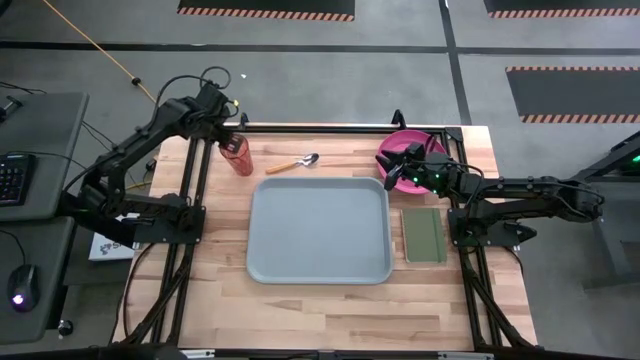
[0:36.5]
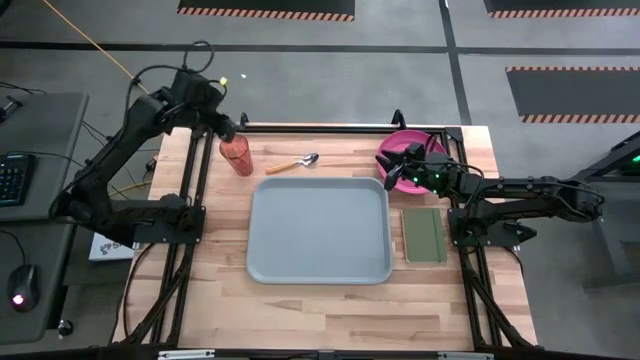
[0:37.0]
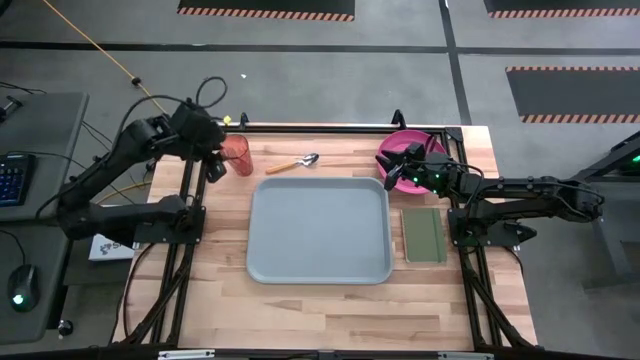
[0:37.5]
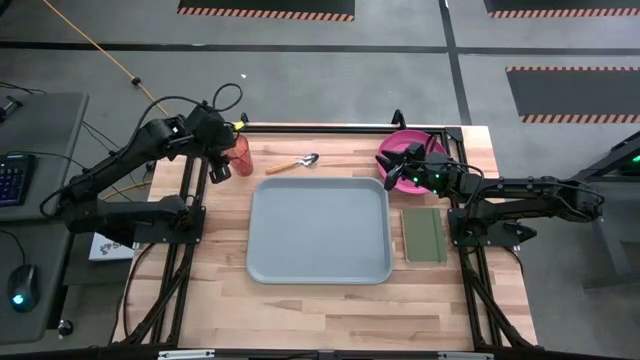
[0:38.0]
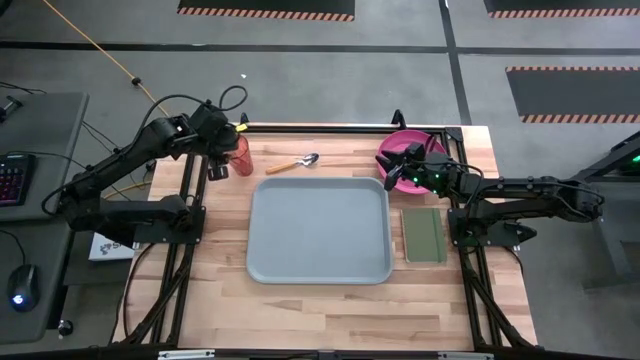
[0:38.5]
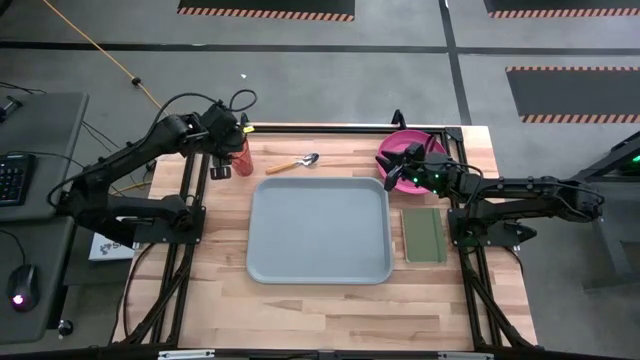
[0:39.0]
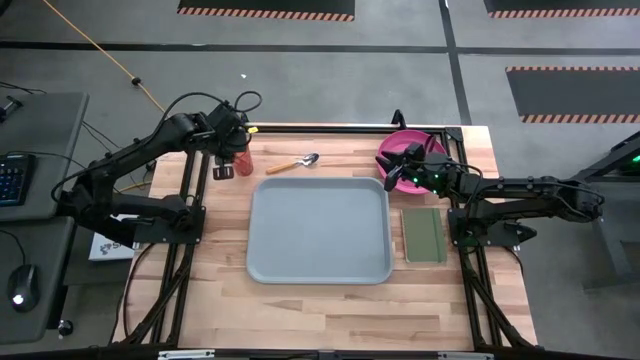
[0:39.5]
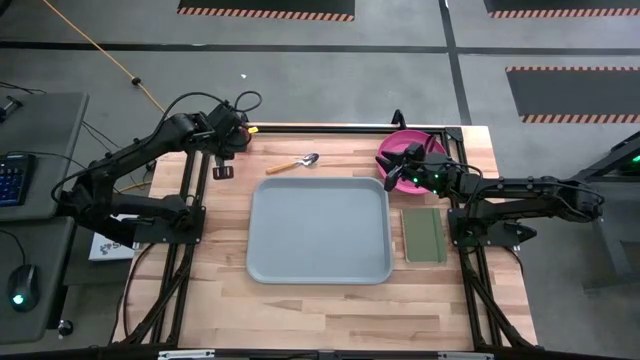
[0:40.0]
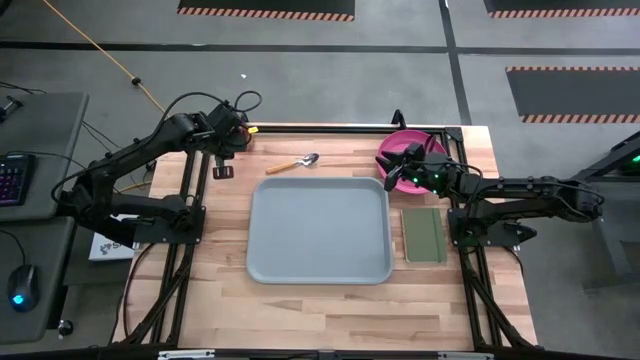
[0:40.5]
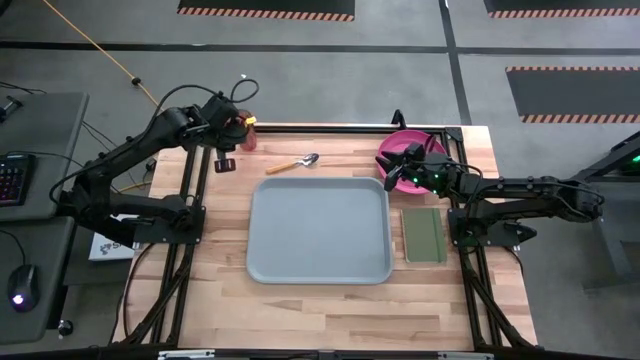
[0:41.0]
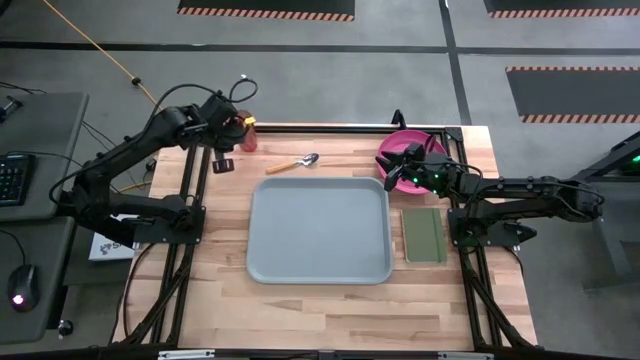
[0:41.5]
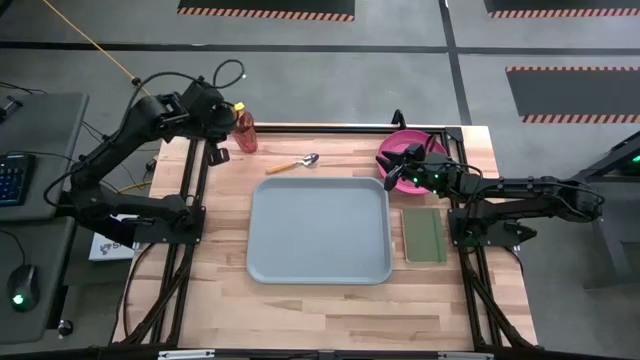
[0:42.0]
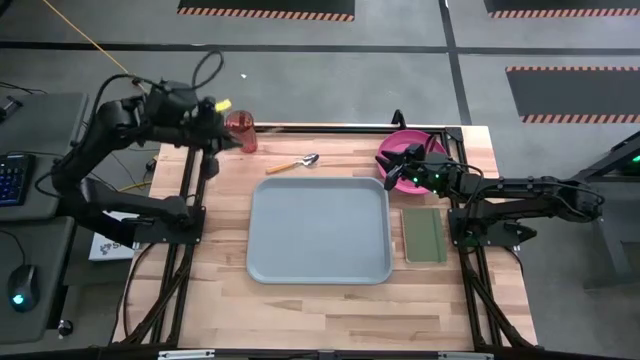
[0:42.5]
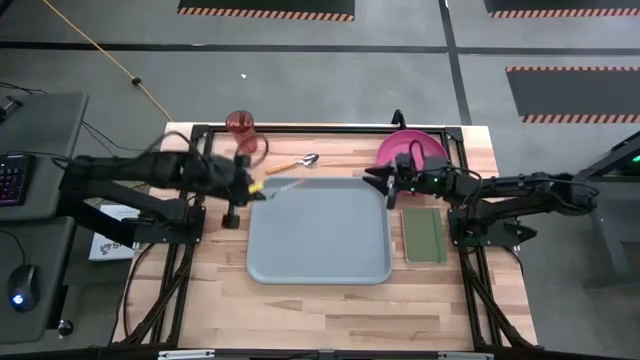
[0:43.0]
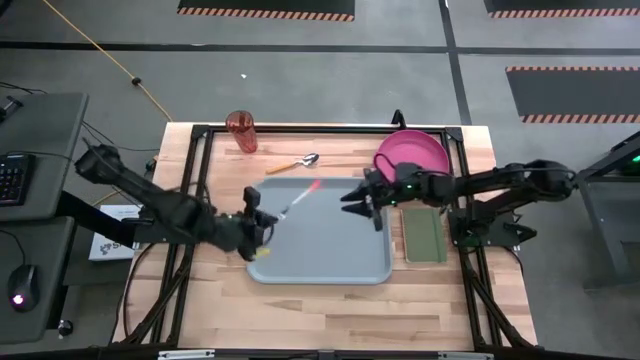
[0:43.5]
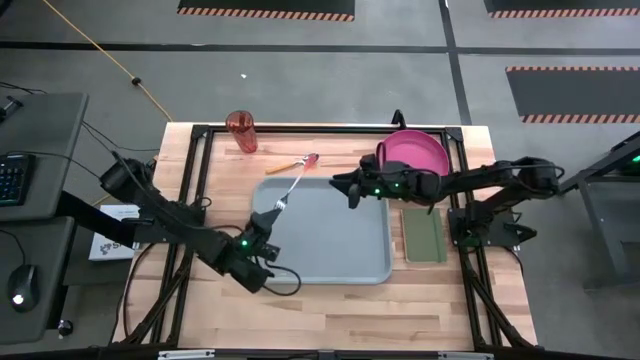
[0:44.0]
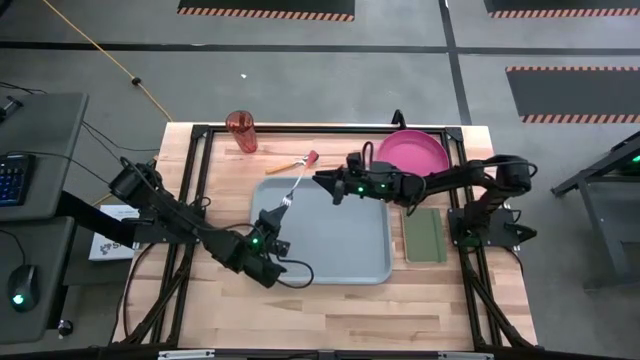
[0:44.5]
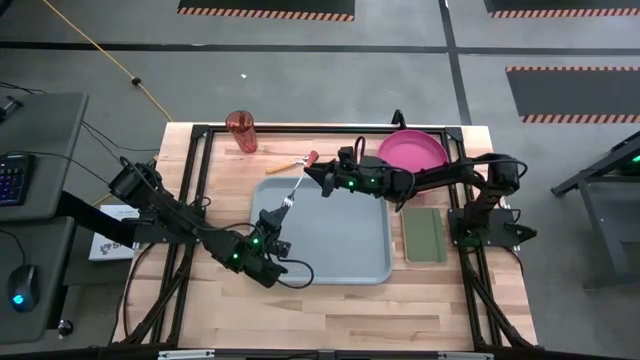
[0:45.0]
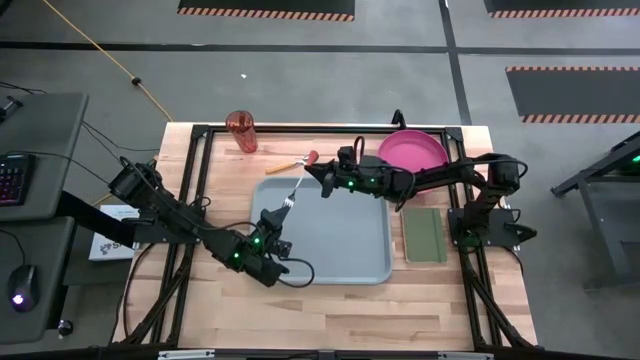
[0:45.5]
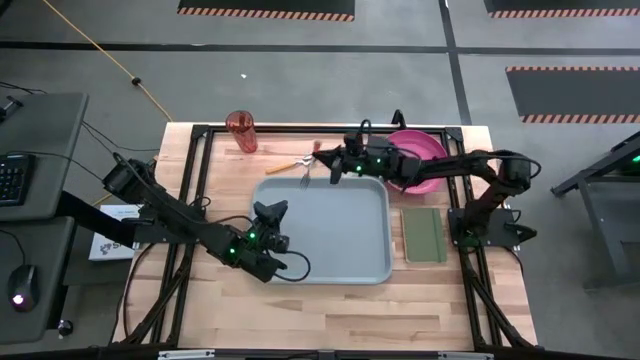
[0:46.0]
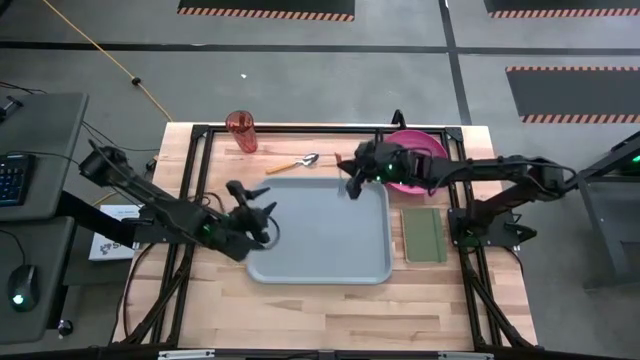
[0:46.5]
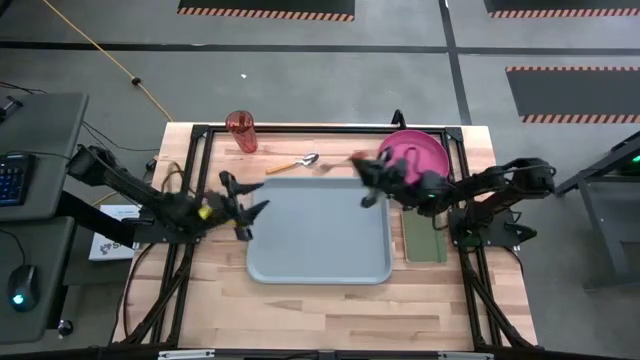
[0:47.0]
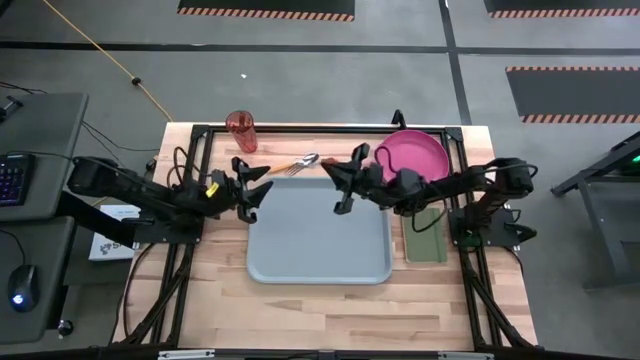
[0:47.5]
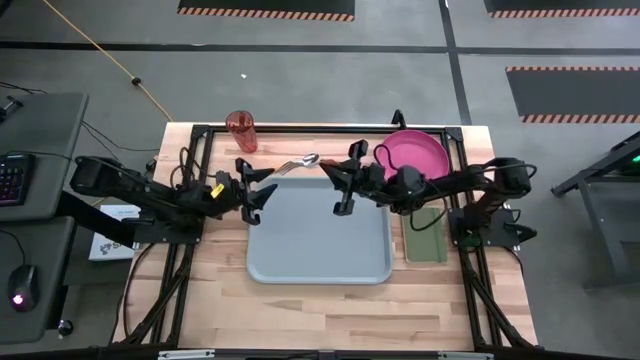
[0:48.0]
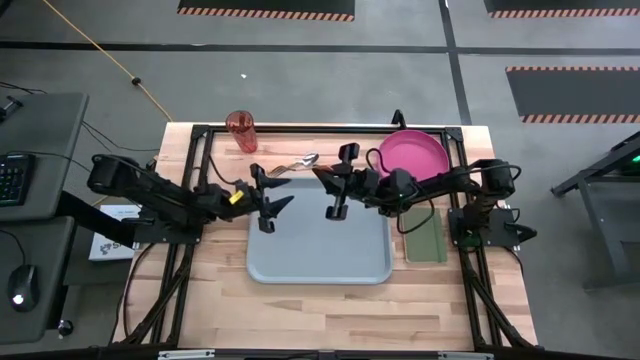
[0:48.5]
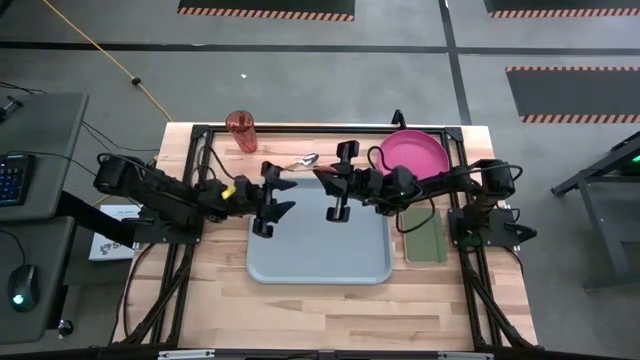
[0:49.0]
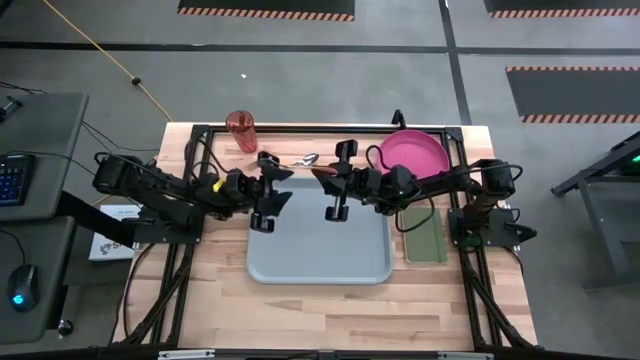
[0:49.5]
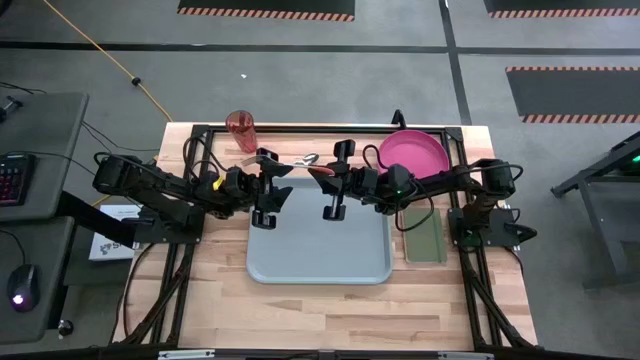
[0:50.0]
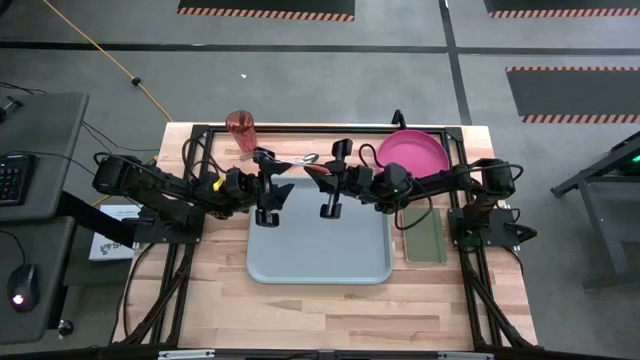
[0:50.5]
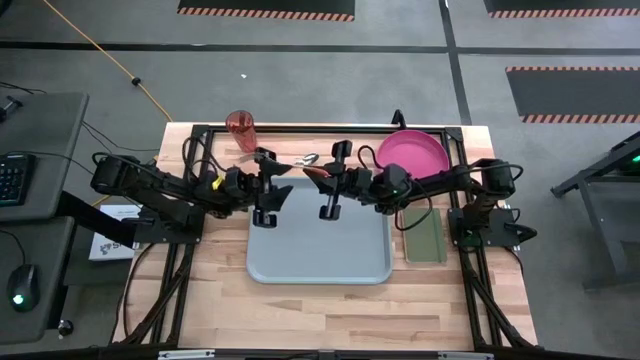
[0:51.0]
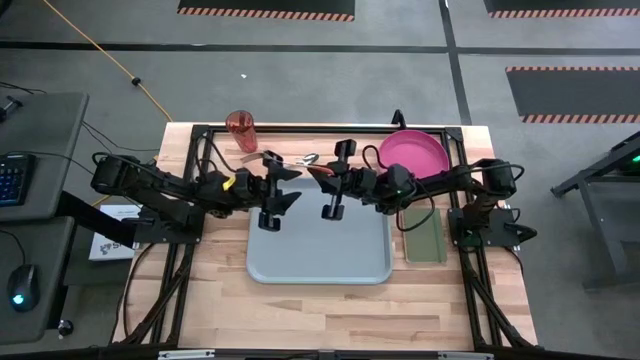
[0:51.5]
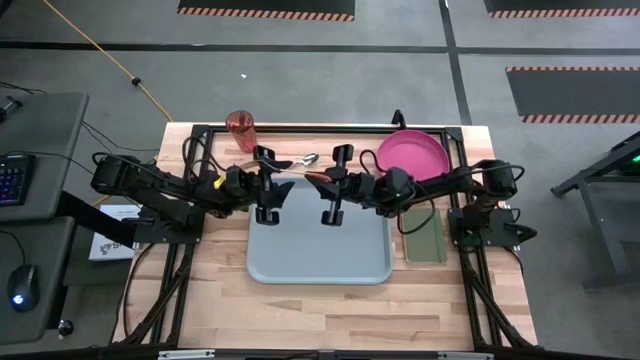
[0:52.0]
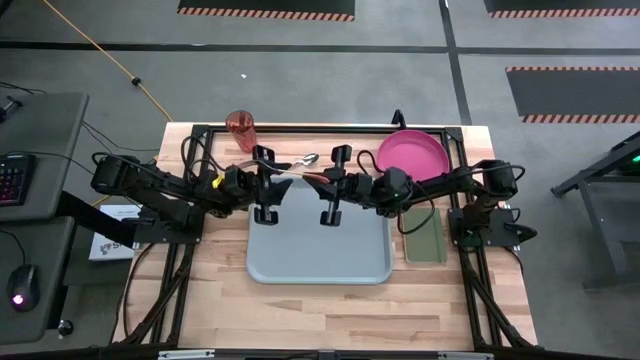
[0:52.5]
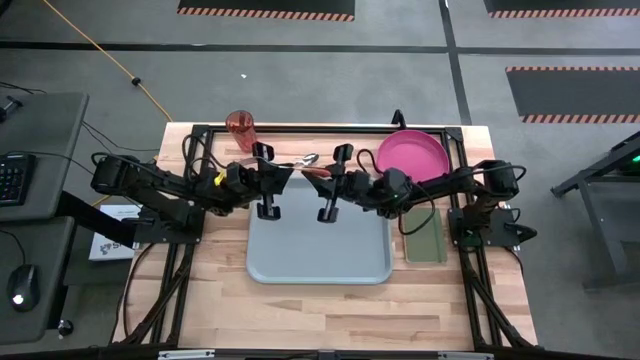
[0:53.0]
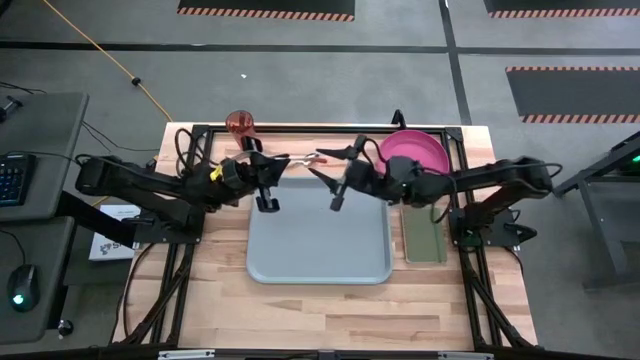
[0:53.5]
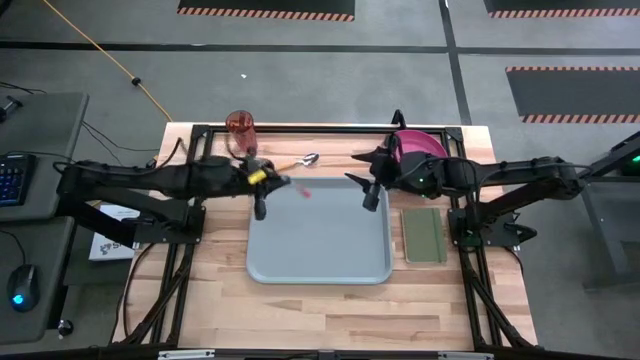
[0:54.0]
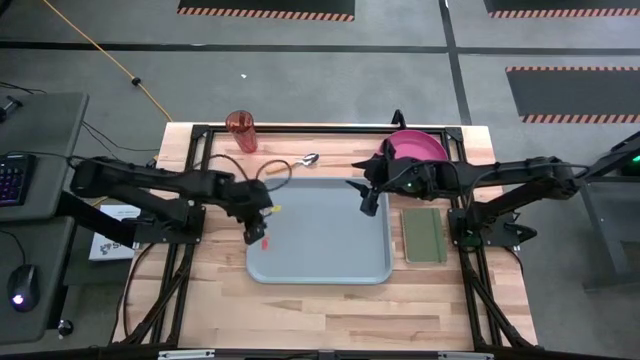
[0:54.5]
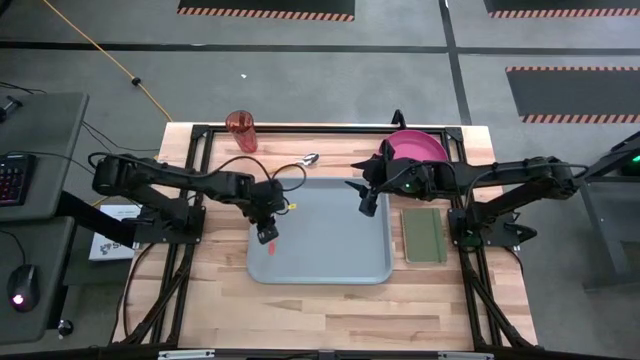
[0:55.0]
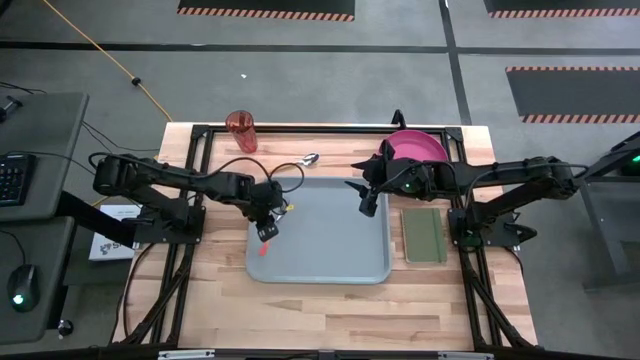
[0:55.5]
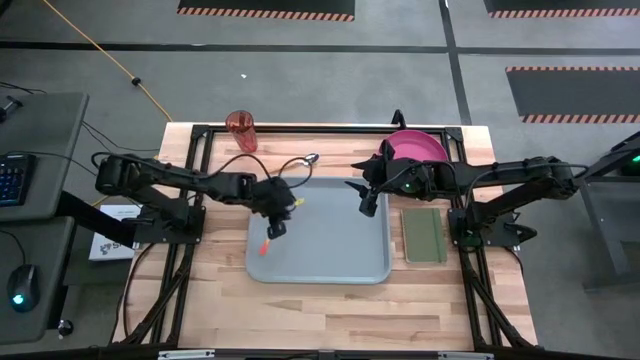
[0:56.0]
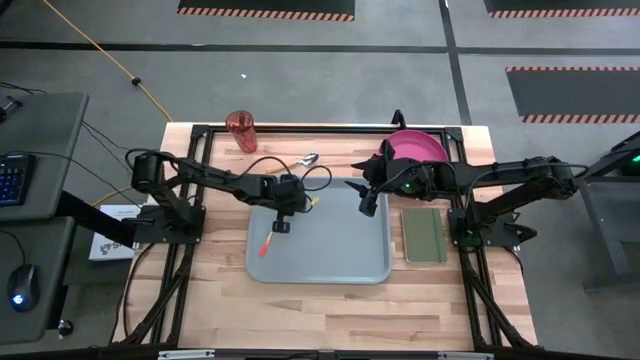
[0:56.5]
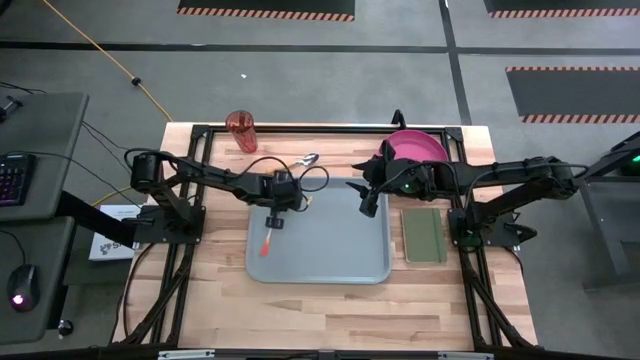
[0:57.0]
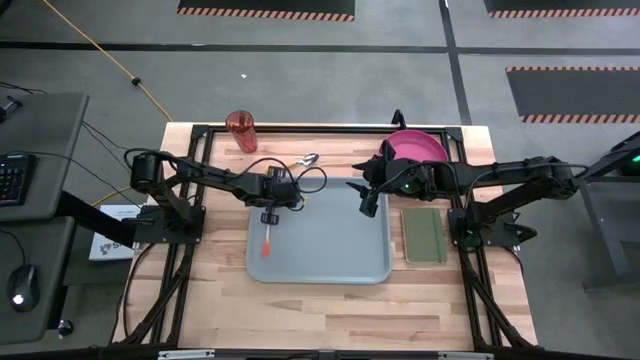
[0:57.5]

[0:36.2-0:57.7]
Task: Pick and place plate/cup/fork/spoon on tray
Put the orange fork on the gray serving tray
